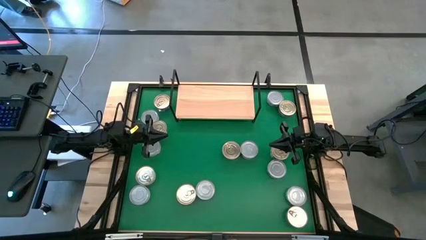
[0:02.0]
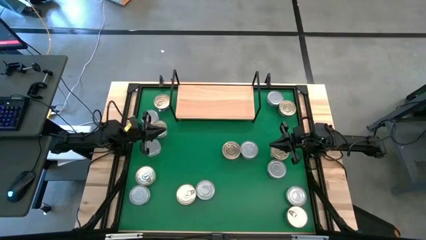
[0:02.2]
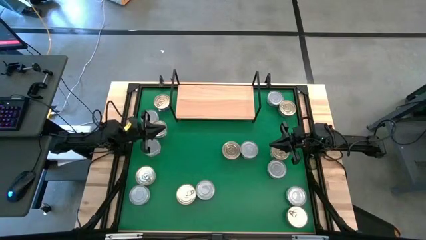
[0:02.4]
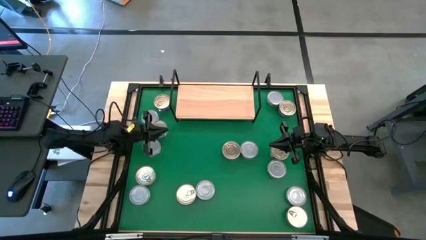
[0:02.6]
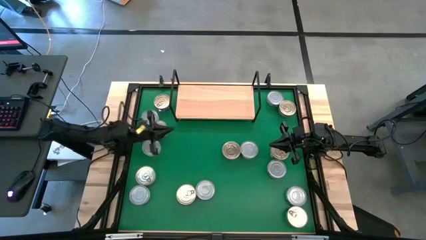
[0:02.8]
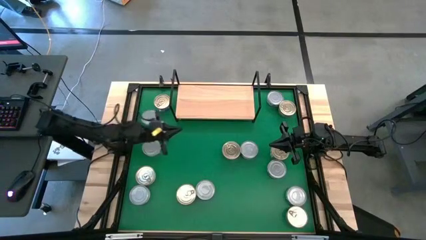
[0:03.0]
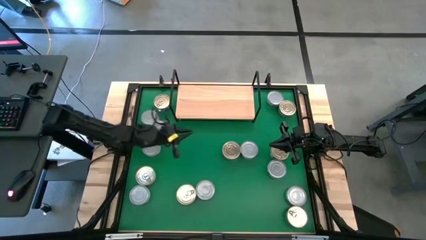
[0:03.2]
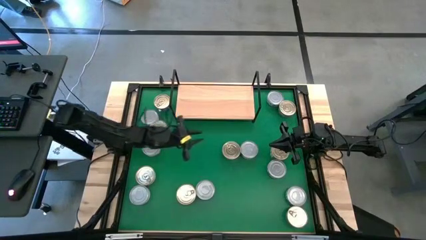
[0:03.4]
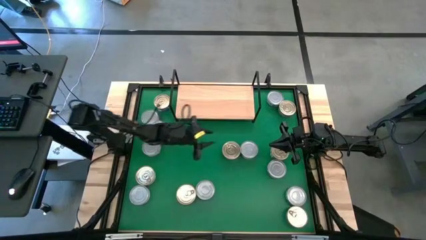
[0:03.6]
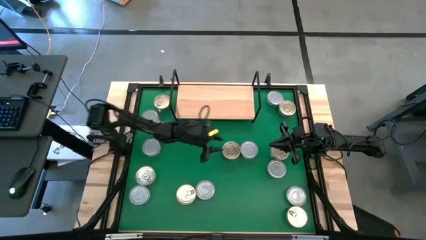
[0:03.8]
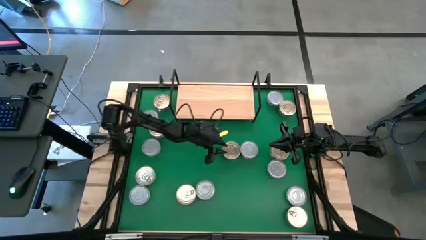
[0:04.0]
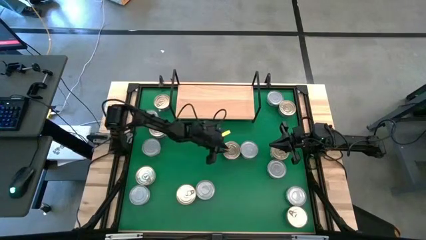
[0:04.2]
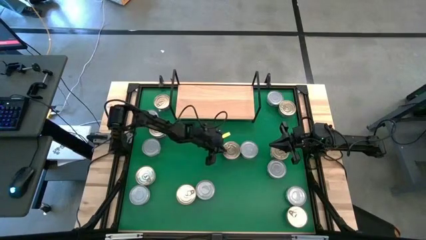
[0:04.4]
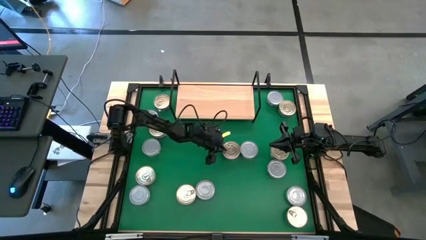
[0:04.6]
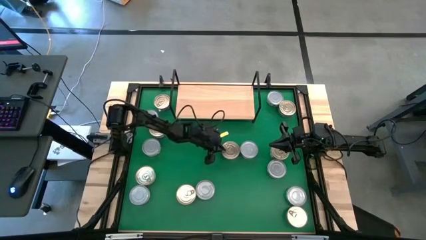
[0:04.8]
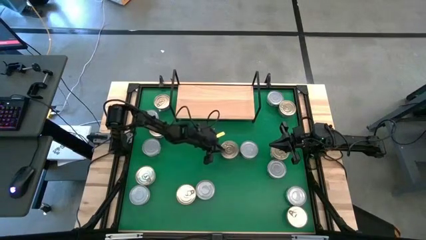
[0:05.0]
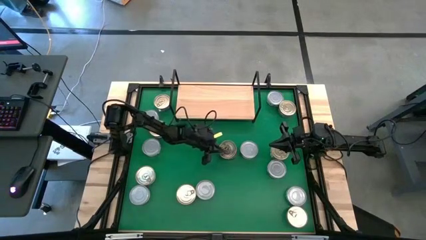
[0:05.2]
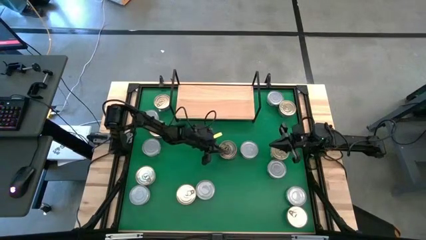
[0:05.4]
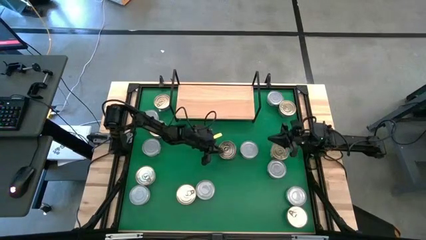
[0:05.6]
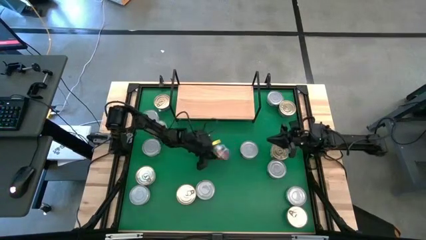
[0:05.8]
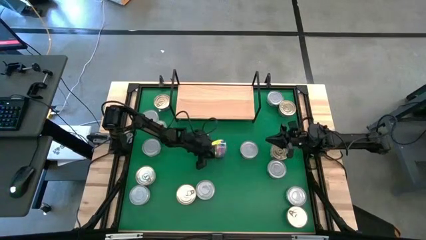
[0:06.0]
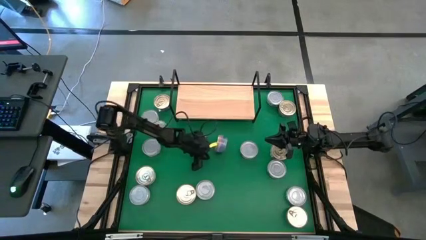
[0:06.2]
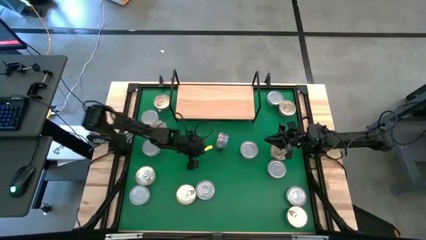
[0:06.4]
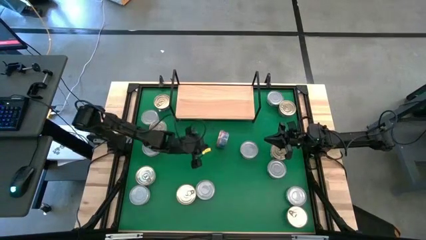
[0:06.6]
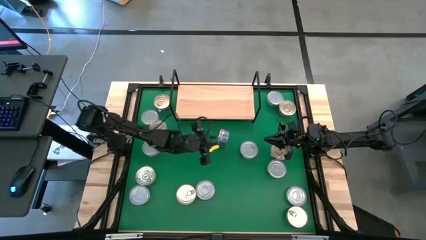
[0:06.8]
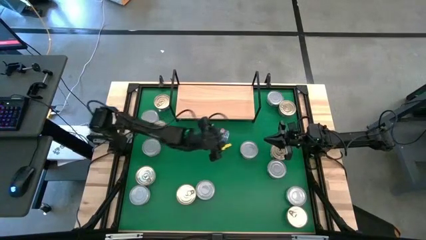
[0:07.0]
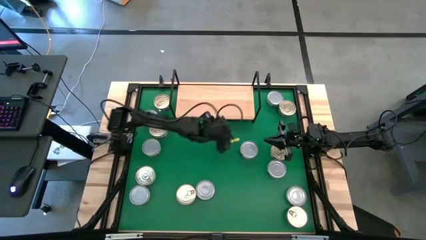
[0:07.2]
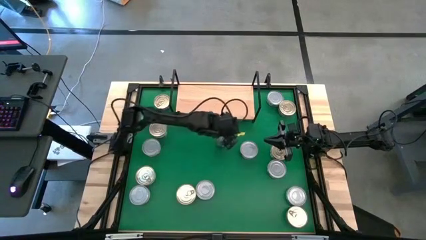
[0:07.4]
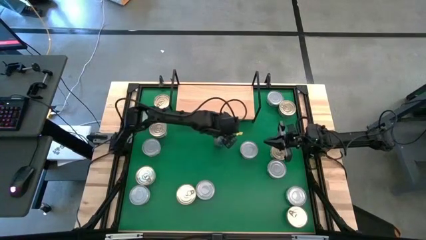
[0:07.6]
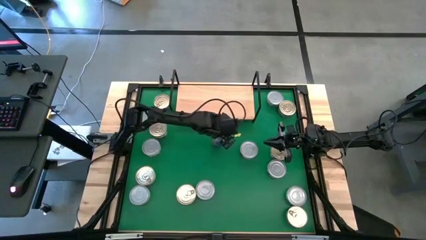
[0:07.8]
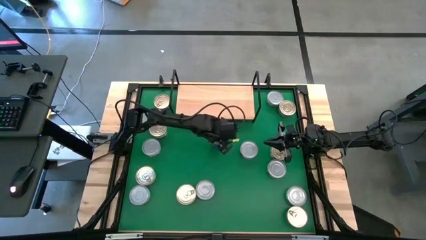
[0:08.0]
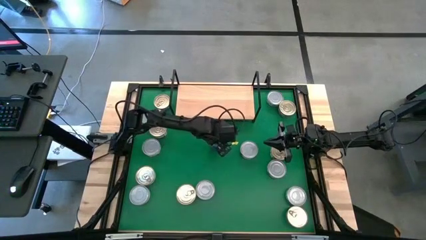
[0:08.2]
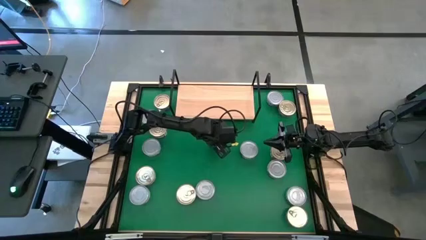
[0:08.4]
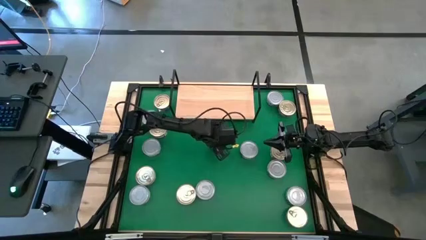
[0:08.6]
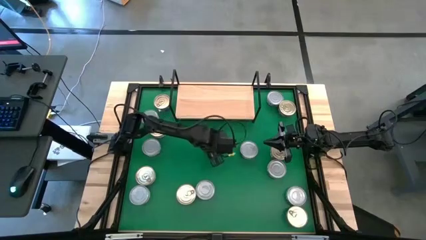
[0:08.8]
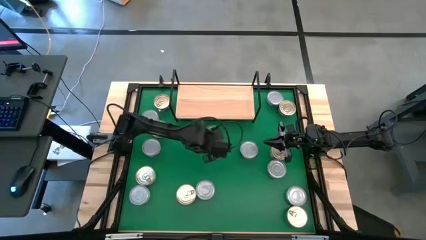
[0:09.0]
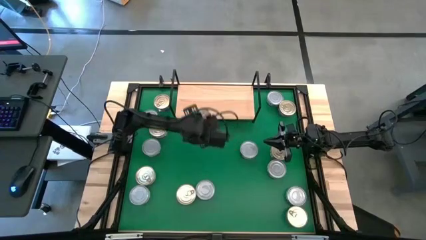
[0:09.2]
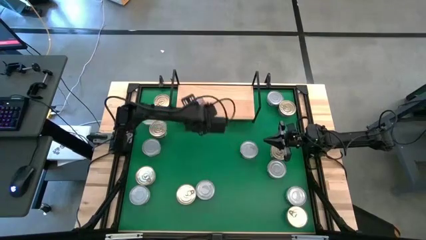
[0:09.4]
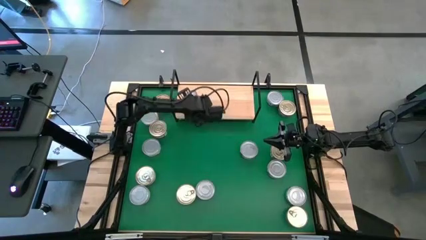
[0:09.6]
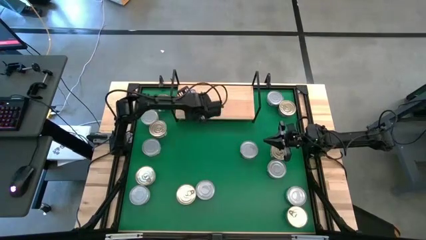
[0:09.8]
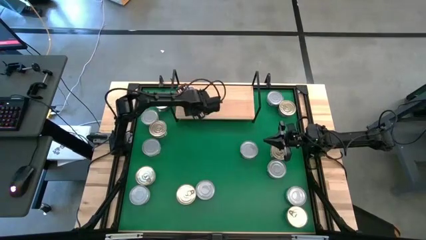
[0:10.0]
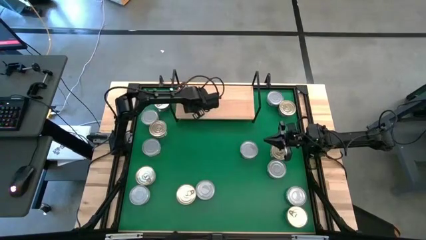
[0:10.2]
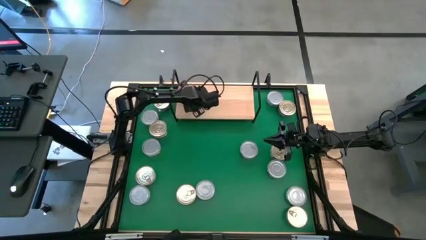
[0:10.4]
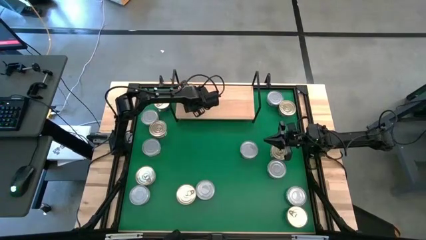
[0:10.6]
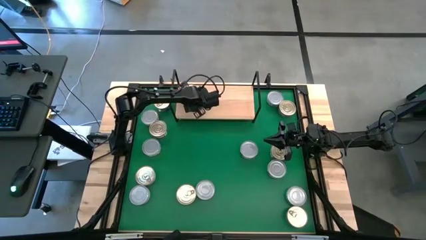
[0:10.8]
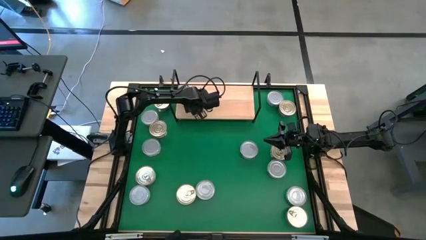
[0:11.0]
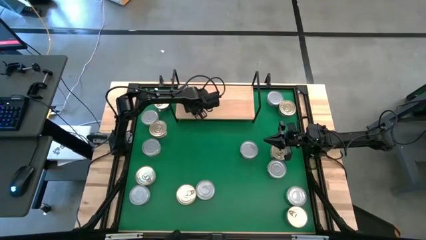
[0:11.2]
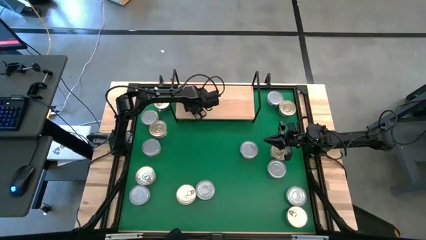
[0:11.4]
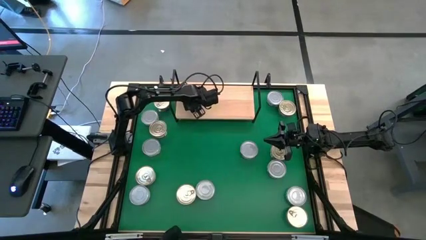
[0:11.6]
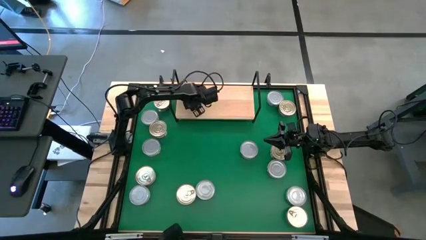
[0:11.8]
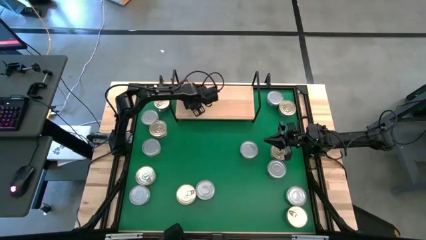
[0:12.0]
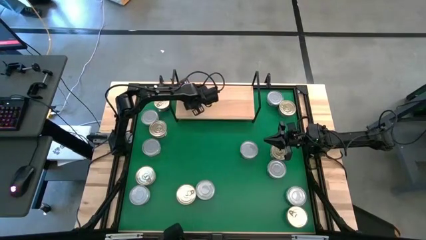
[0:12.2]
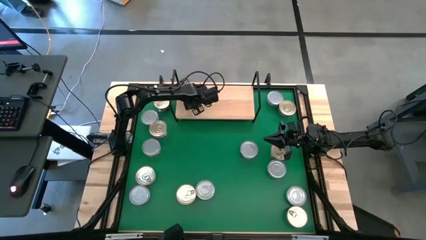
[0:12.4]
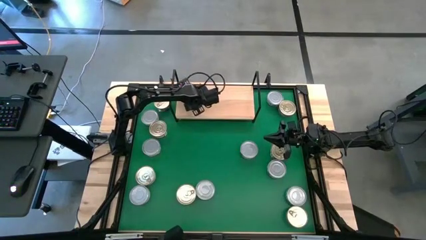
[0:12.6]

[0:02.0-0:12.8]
Task: Stack canned seafood by type on shelf
Put the blue pink tuna can on the shelf

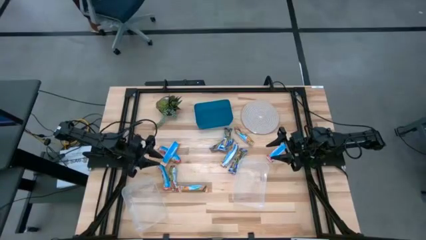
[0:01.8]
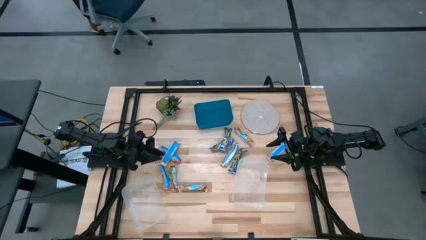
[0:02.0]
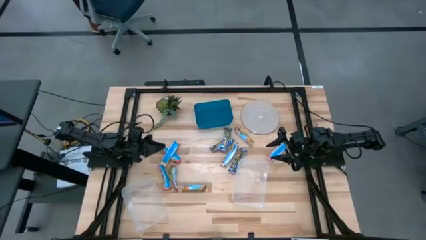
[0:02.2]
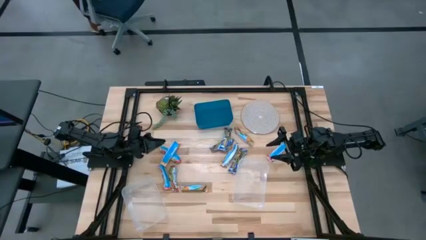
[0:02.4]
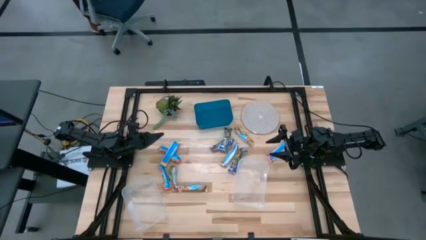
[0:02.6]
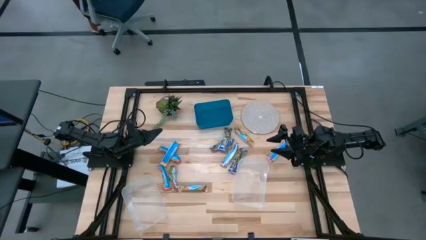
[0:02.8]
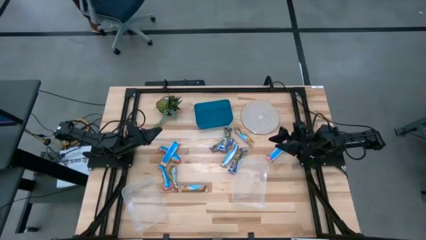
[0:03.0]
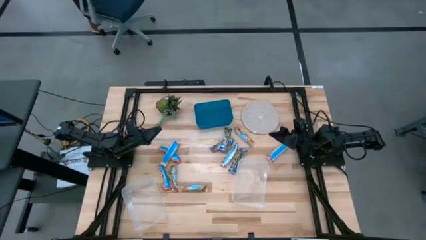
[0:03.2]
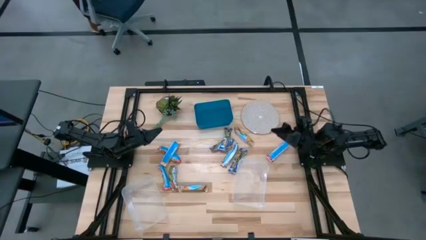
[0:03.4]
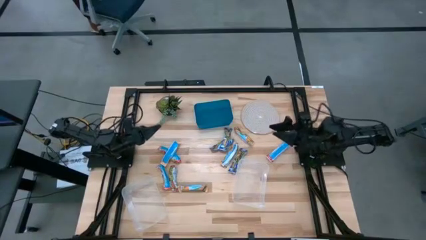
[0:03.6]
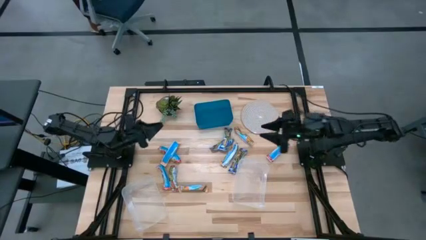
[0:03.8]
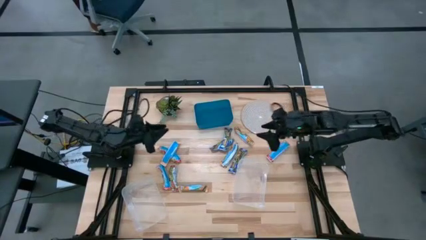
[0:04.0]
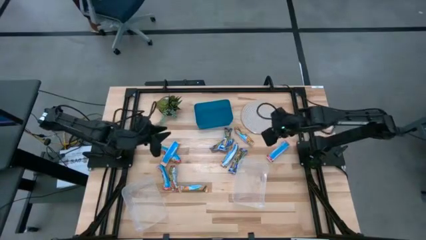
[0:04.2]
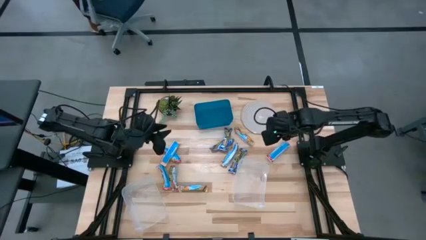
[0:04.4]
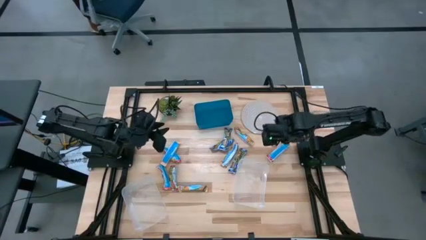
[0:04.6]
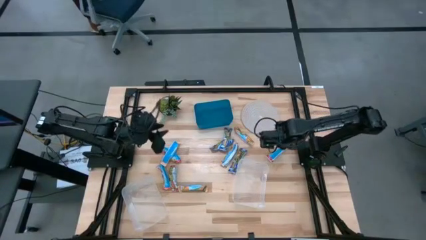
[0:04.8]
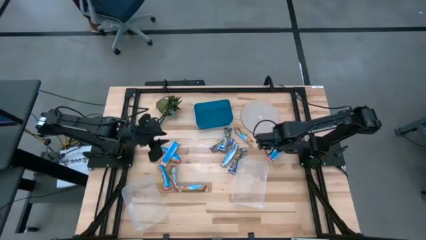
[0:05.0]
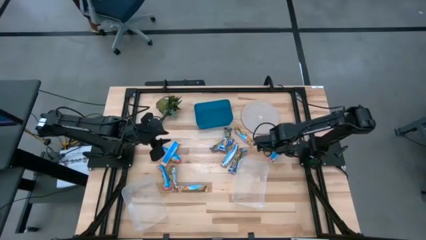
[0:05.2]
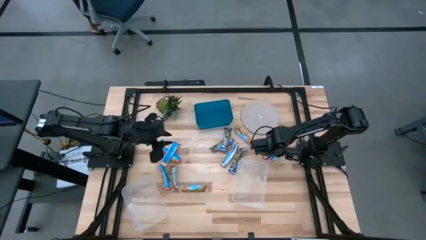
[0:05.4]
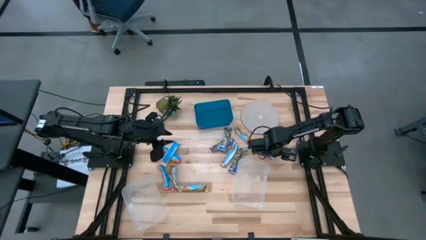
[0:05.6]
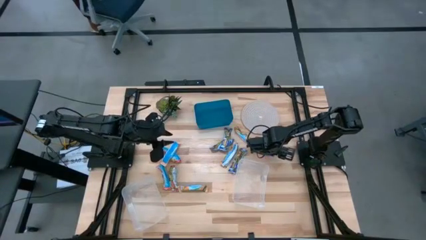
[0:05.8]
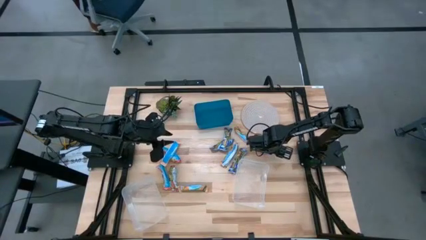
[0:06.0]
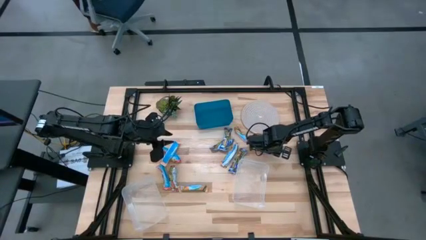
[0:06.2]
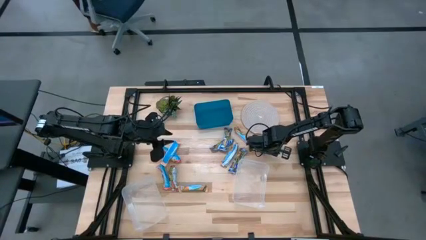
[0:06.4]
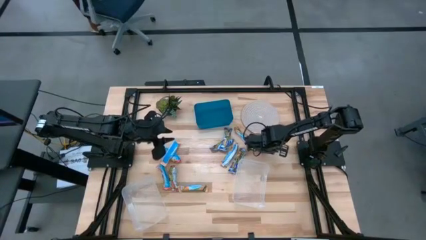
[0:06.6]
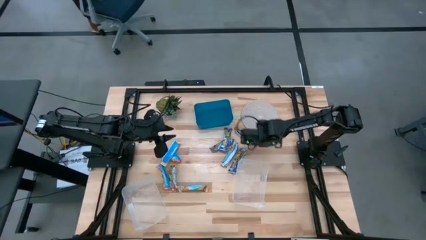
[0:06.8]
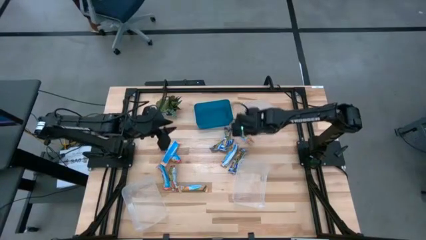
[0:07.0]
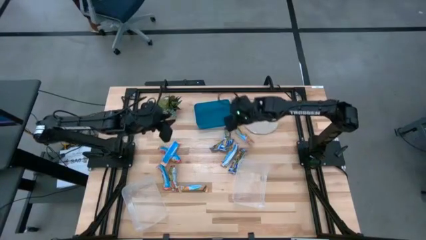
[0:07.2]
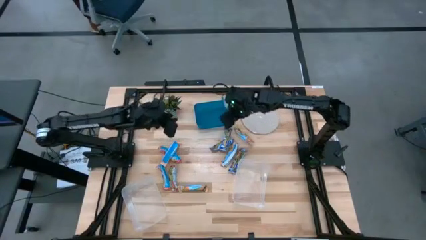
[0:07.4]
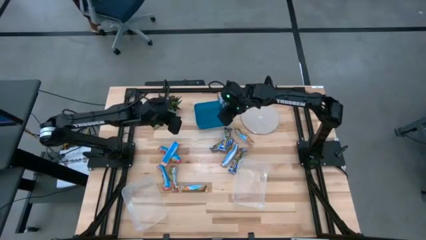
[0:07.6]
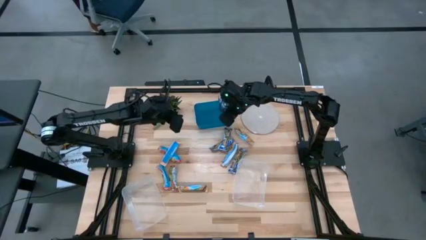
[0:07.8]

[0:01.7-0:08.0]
Task: Pick and place Granola Bars by type
Put the red granola bar into the blue bin
